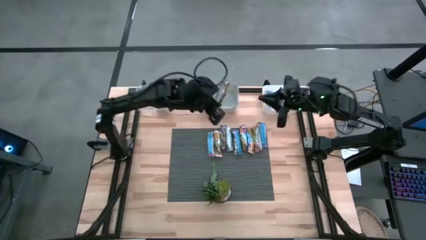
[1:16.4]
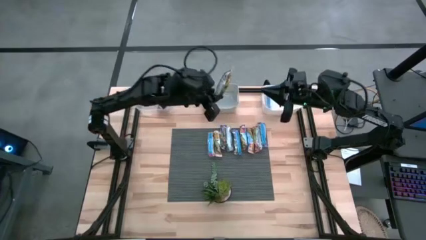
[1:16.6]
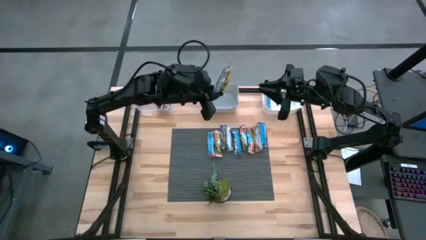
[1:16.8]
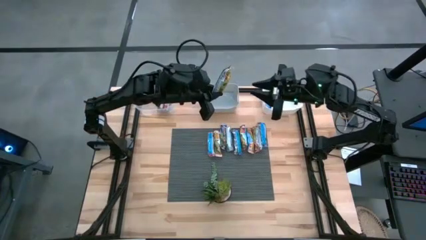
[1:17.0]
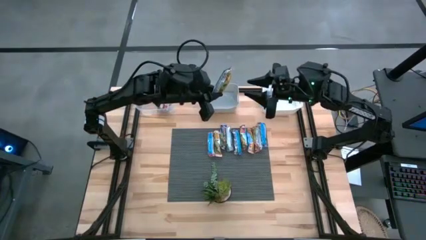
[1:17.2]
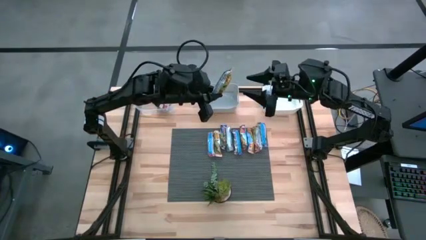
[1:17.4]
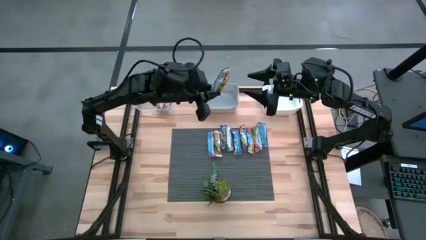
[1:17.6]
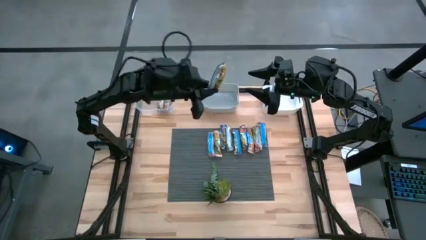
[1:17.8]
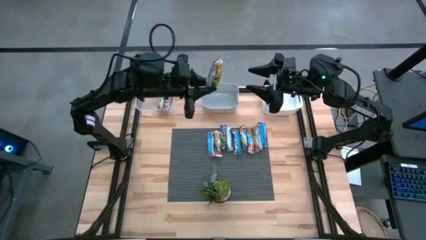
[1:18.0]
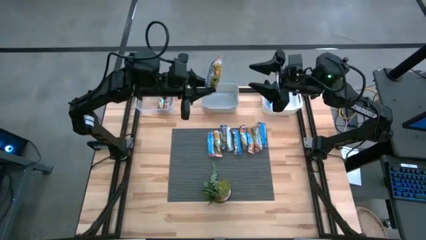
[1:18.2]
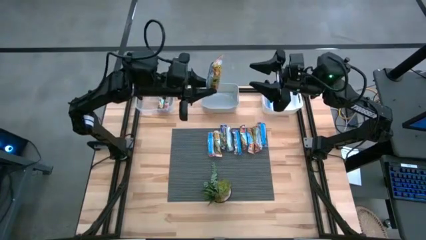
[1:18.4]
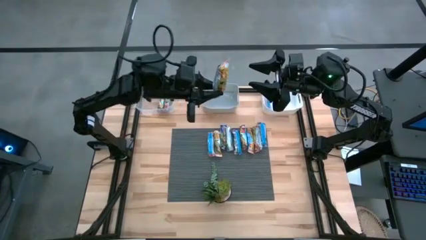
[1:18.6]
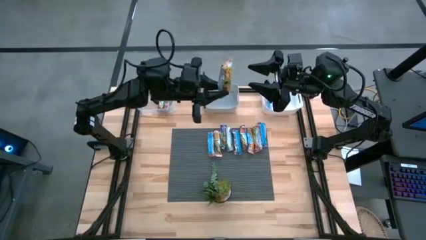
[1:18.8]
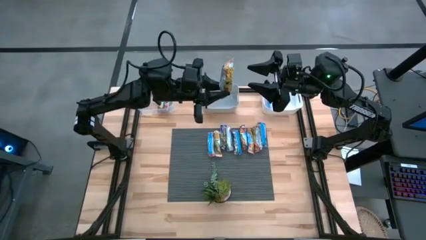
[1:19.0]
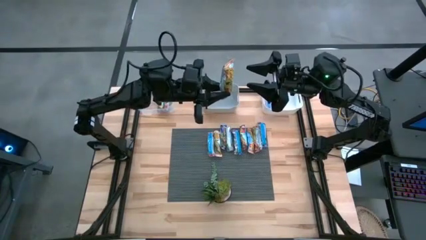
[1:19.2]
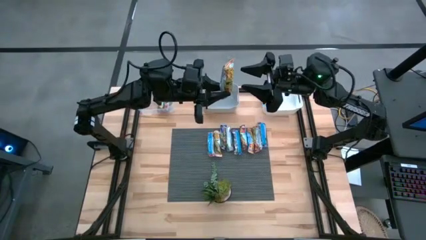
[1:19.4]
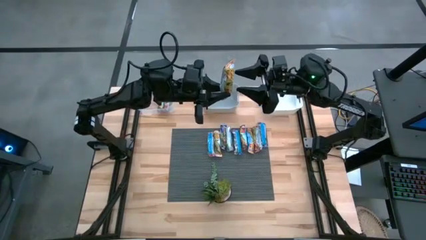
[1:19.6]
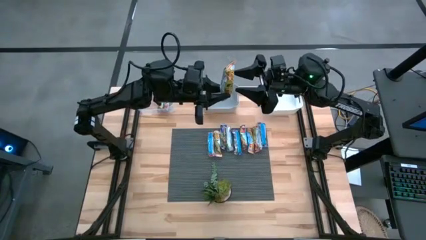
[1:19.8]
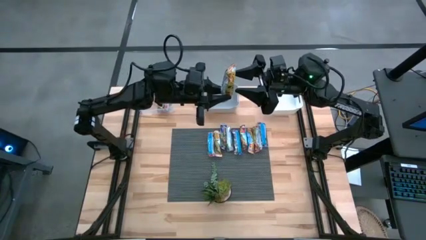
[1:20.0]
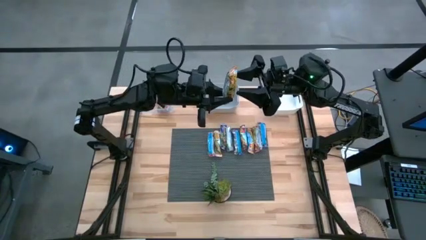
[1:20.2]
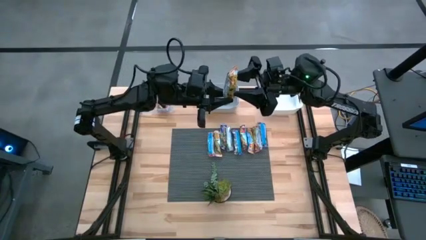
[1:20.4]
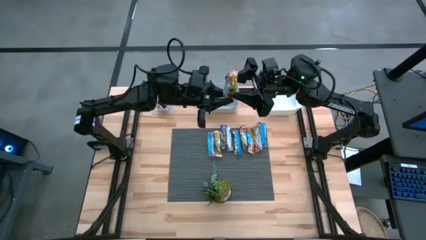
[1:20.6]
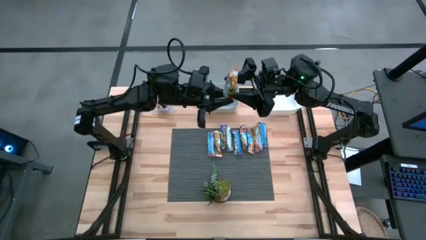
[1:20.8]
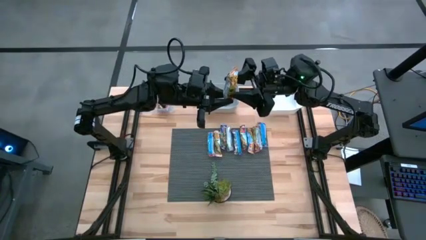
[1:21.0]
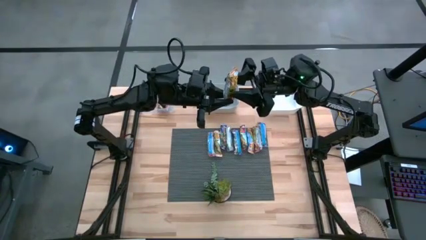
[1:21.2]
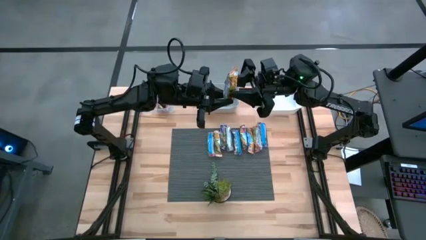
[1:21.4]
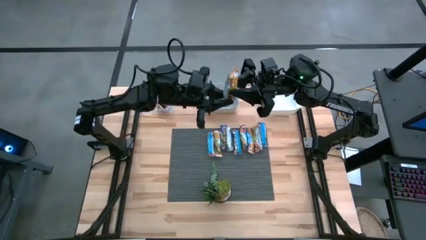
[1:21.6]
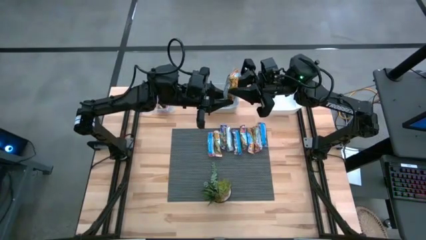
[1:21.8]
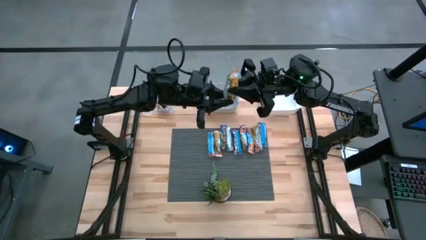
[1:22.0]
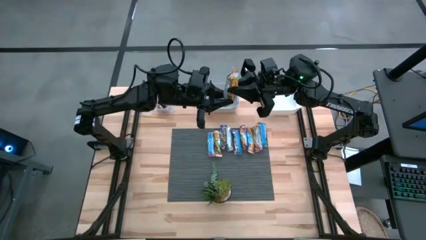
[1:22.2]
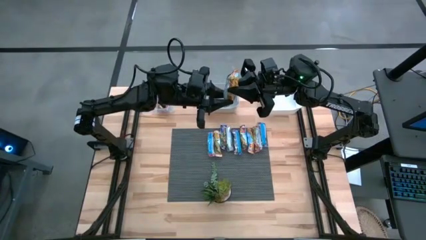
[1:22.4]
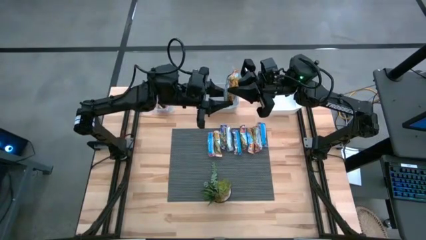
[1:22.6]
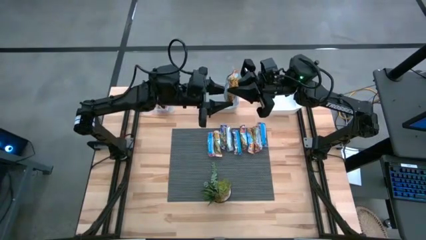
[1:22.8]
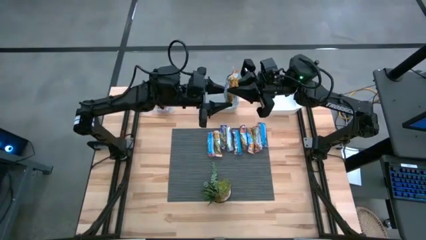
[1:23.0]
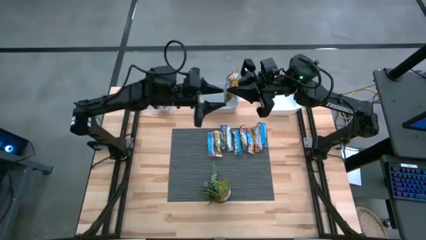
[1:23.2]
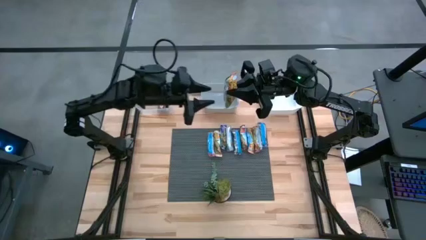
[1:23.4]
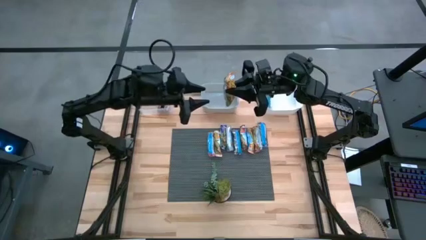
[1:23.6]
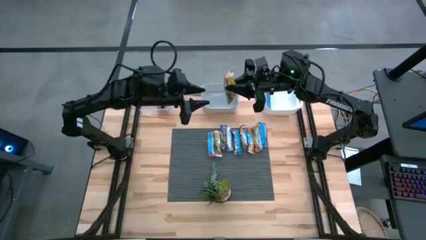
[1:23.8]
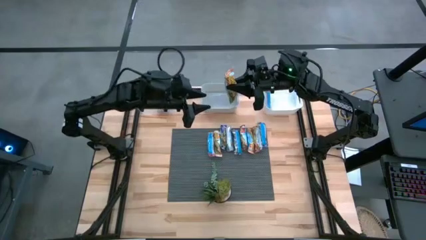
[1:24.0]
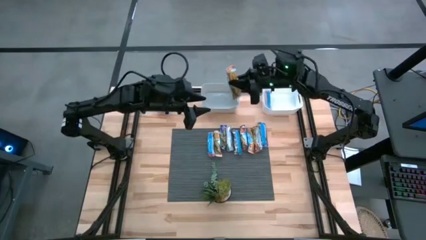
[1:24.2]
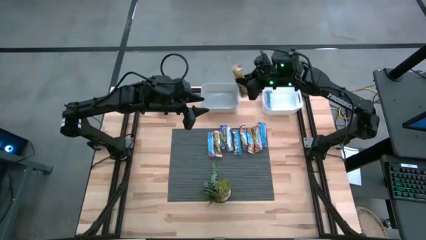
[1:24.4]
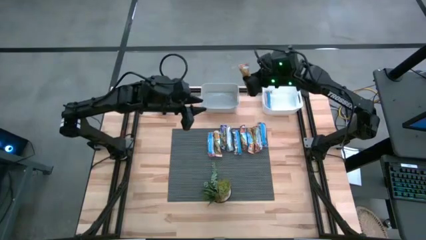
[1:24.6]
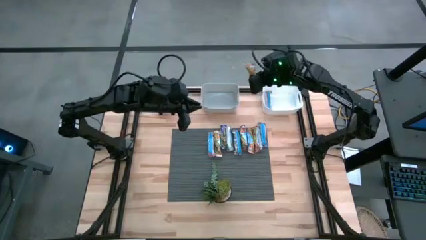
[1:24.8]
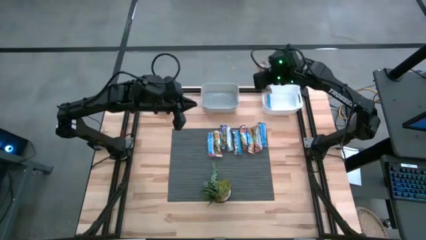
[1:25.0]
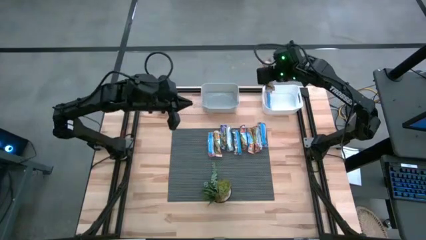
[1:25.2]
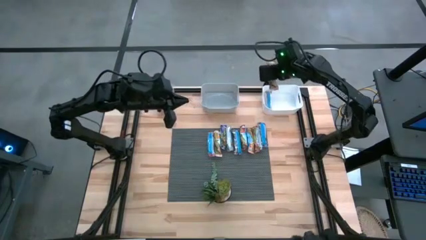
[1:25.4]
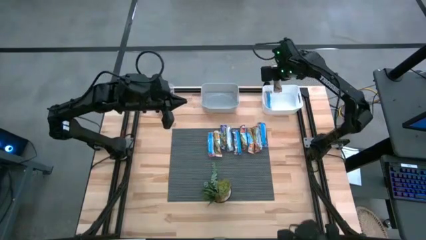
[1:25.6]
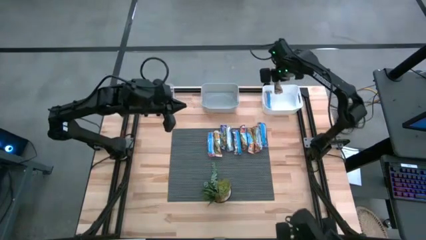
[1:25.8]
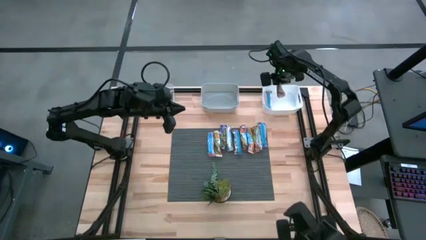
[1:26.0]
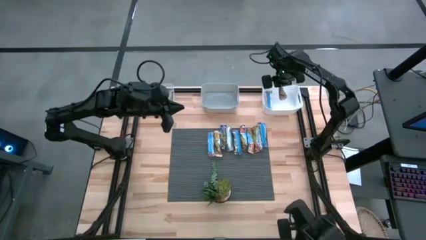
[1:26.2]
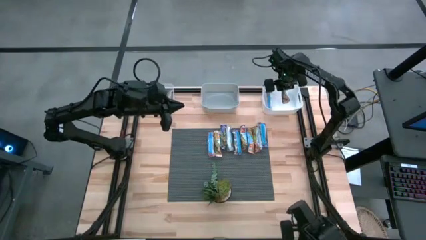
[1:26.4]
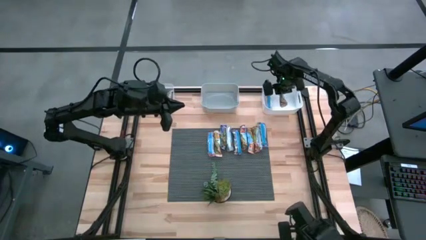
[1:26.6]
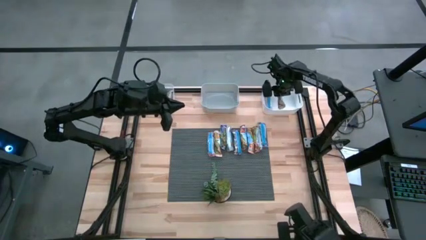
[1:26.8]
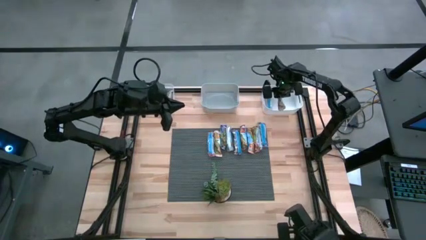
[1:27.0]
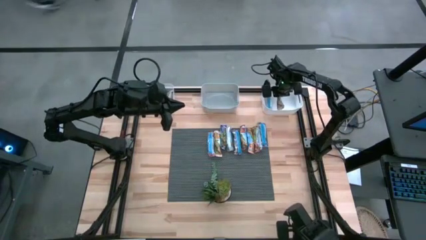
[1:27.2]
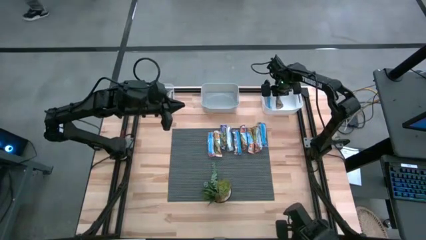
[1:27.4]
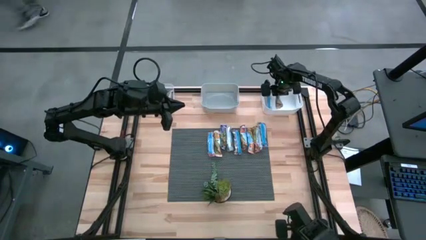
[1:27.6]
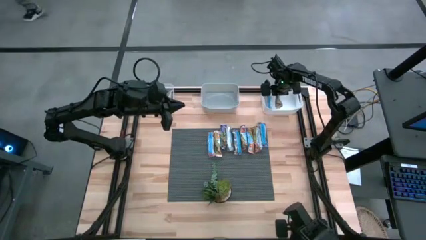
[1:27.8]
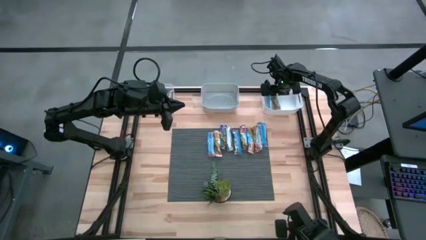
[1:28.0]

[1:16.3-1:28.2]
Task: Pick and place Granola Bars by type
Put the yellow granola bar into the white bin

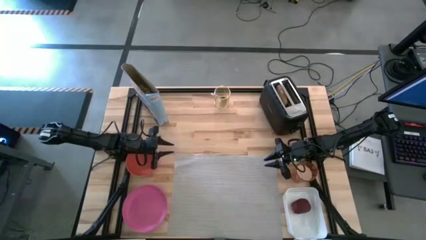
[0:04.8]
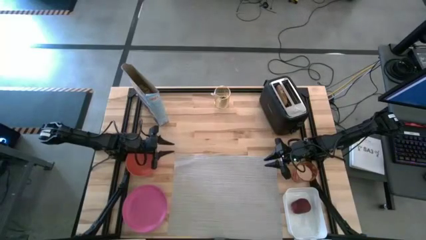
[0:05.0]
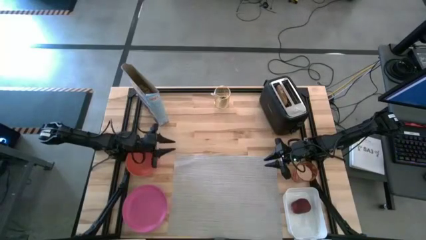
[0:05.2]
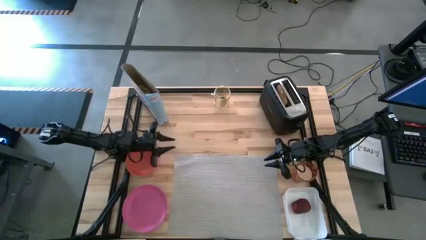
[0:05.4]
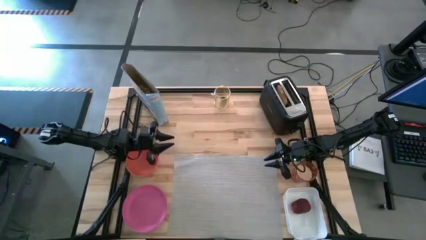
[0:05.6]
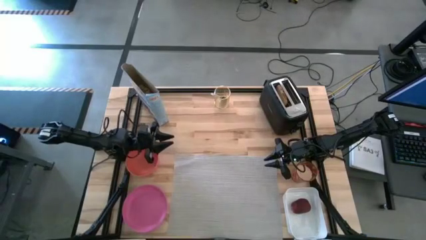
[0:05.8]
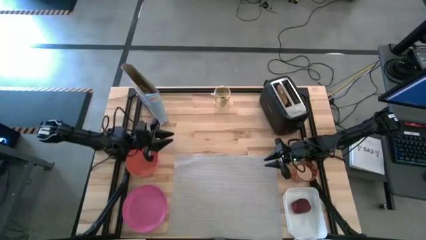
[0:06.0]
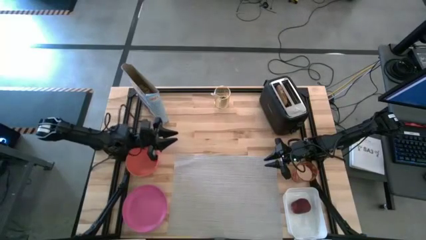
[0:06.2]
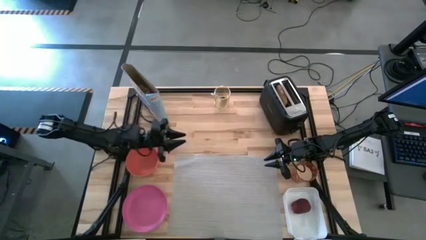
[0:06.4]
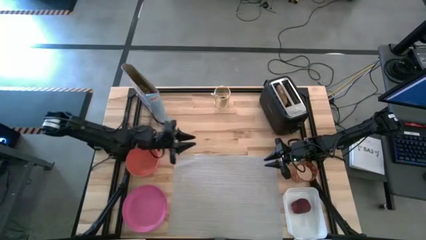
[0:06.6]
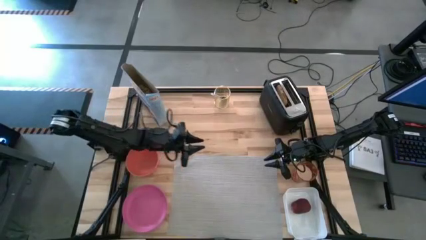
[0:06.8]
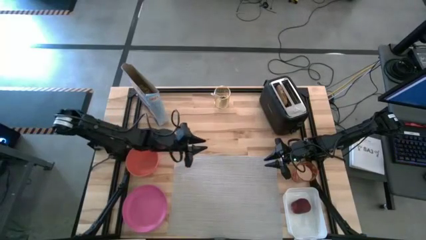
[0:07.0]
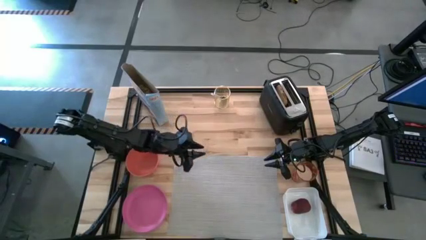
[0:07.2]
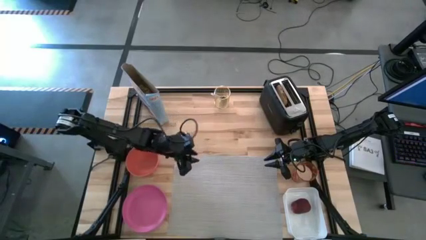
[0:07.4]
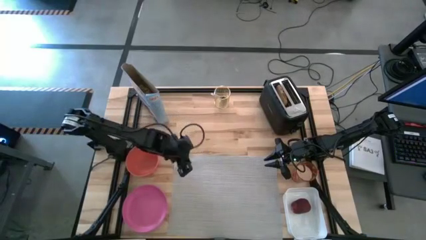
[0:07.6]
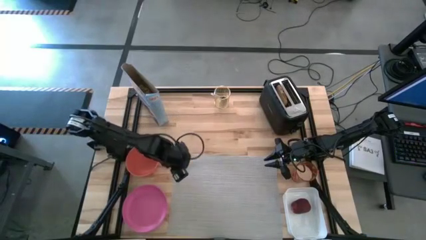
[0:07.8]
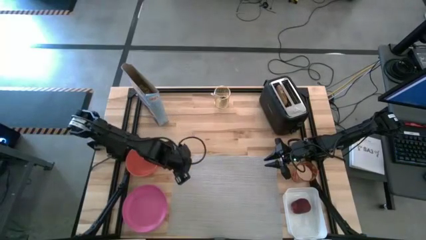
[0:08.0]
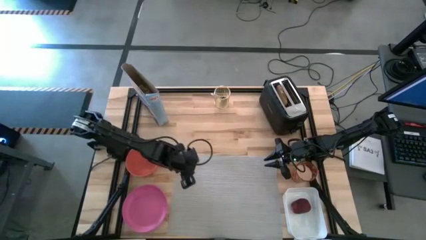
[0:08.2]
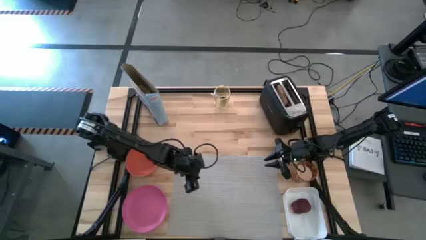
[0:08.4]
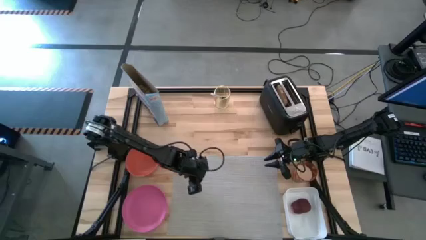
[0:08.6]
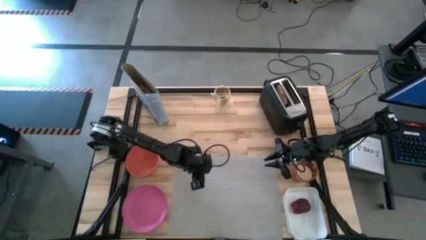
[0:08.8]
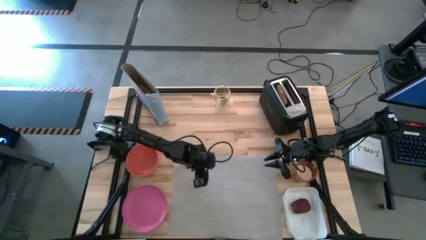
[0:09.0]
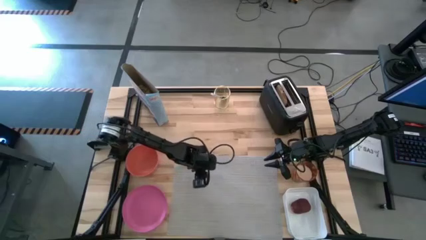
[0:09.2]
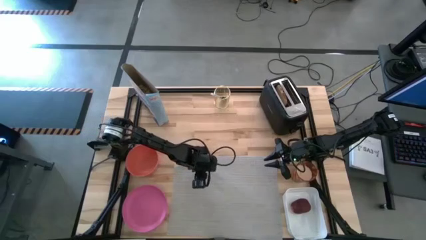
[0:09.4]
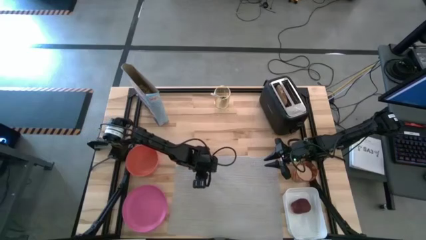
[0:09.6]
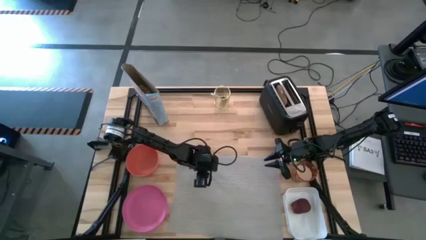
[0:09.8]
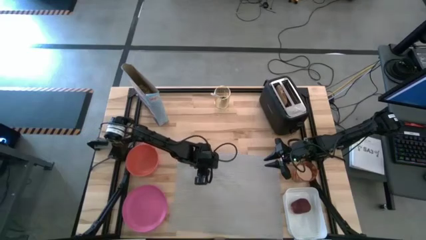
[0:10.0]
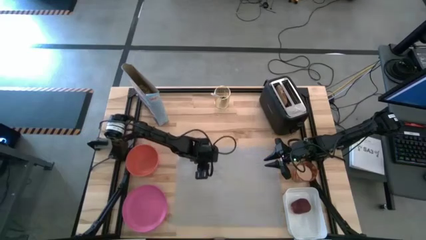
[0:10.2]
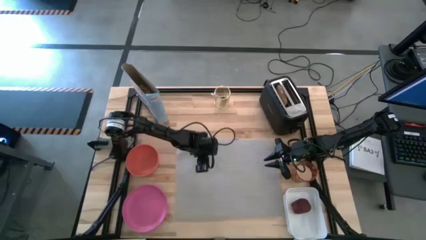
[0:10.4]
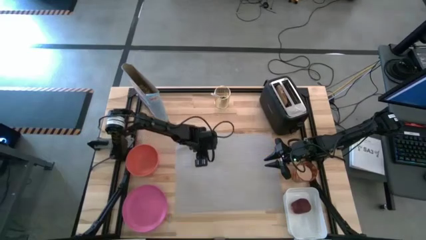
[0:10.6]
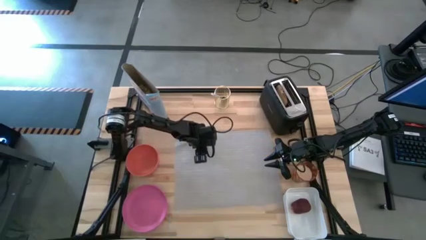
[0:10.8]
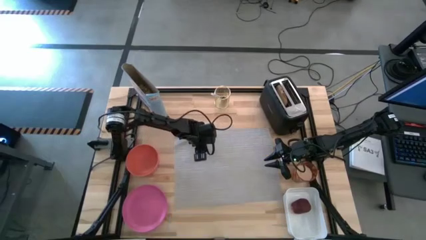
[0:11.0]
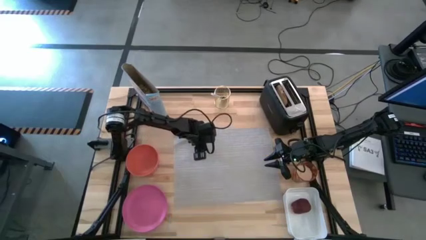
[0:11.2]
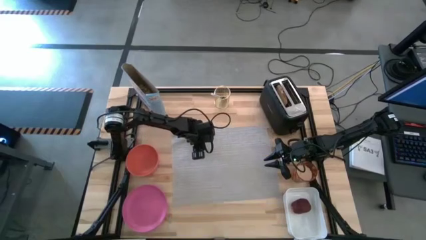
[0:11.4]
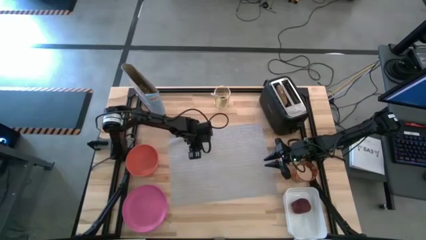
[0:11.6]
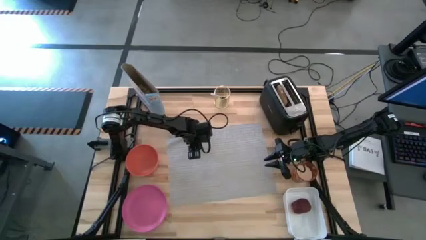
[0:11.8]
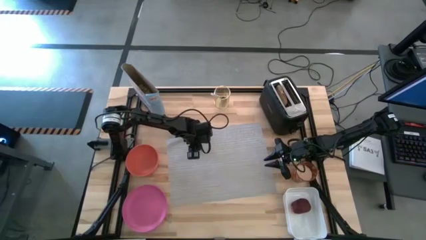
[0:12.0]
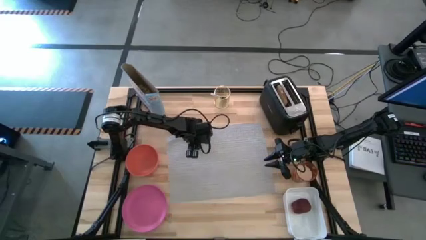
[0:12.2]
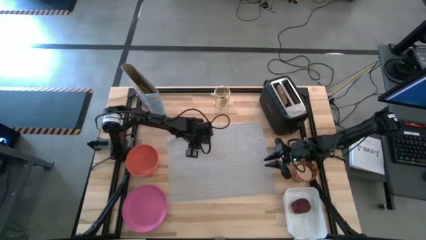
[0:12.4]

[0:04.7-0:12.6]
Task: Arrange a breakfast setting
Move the gray table mat to the center of the table
